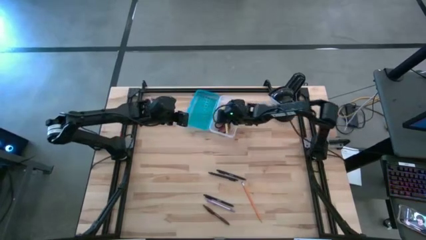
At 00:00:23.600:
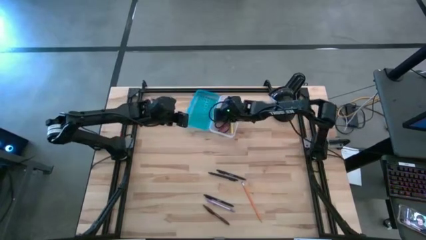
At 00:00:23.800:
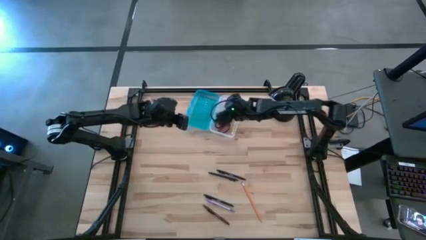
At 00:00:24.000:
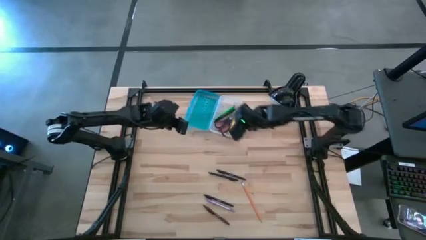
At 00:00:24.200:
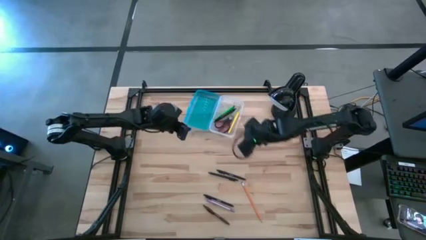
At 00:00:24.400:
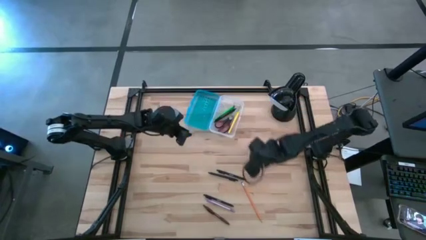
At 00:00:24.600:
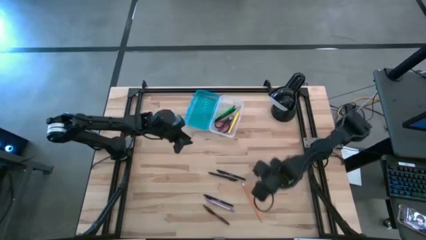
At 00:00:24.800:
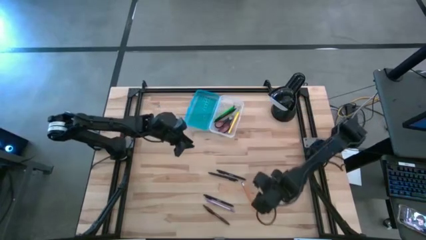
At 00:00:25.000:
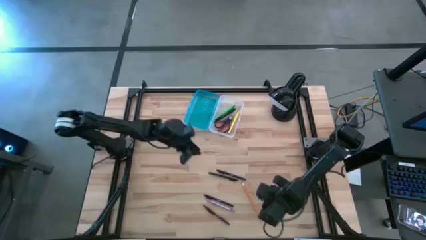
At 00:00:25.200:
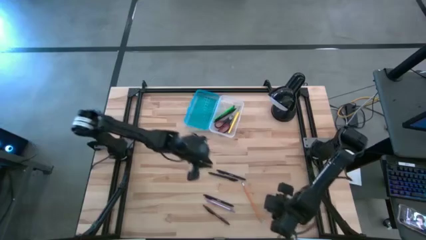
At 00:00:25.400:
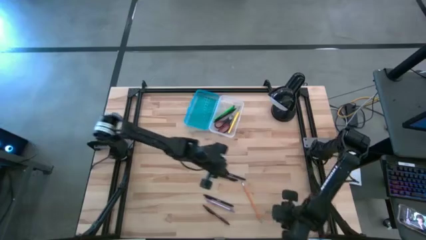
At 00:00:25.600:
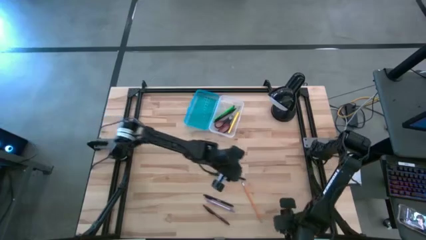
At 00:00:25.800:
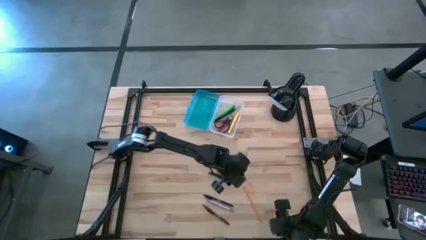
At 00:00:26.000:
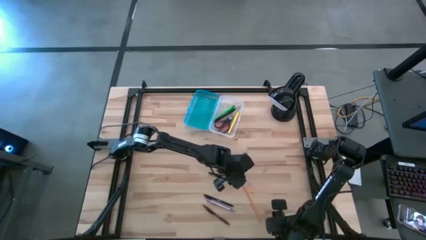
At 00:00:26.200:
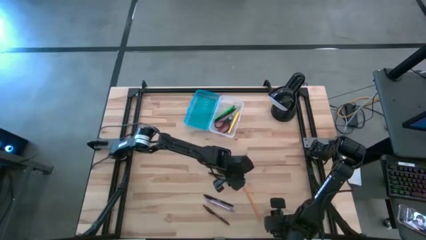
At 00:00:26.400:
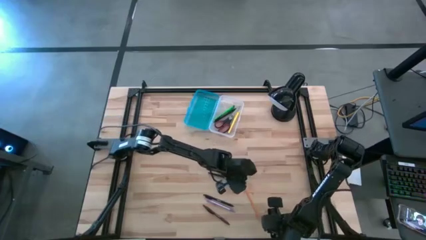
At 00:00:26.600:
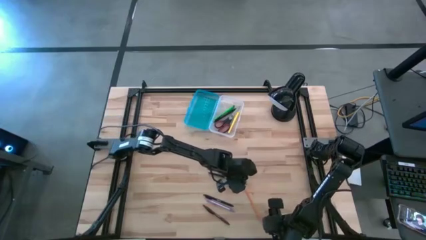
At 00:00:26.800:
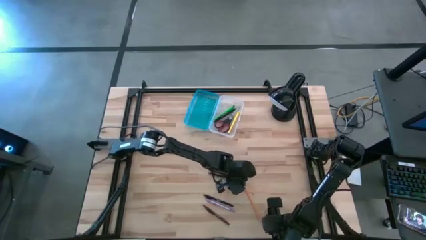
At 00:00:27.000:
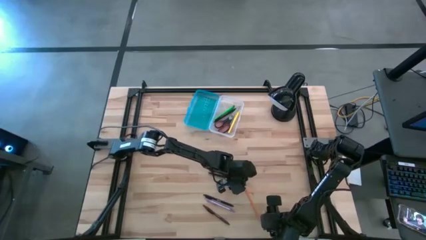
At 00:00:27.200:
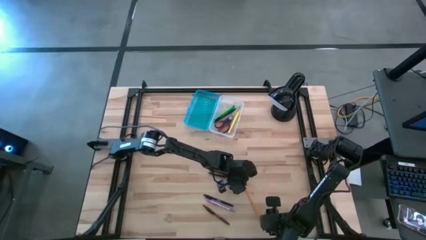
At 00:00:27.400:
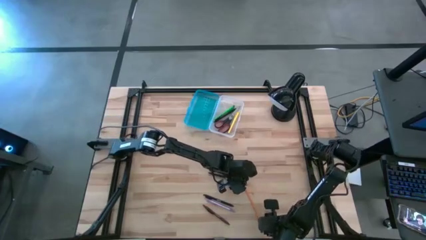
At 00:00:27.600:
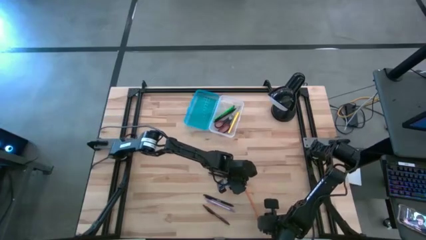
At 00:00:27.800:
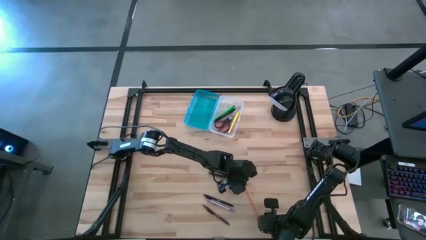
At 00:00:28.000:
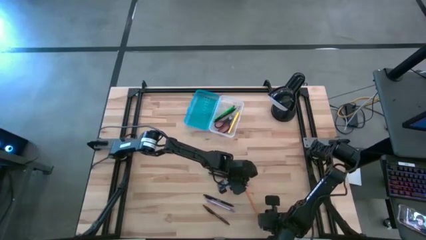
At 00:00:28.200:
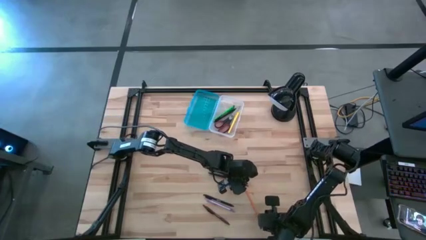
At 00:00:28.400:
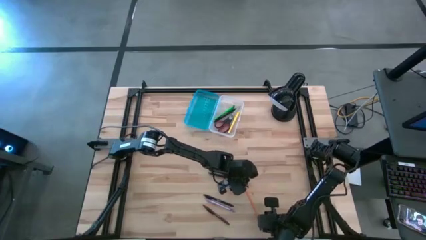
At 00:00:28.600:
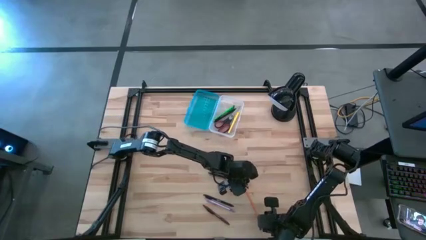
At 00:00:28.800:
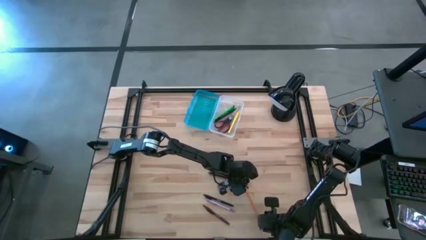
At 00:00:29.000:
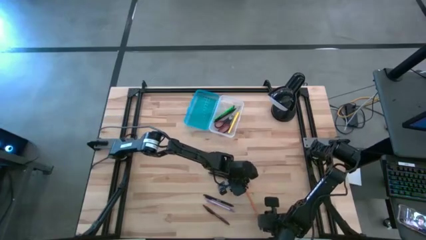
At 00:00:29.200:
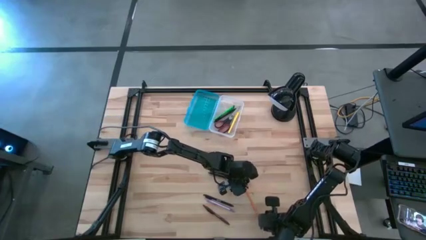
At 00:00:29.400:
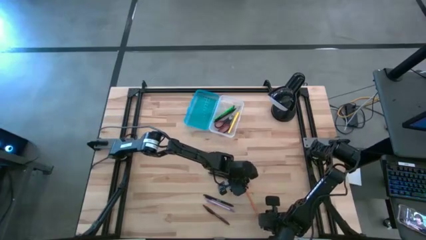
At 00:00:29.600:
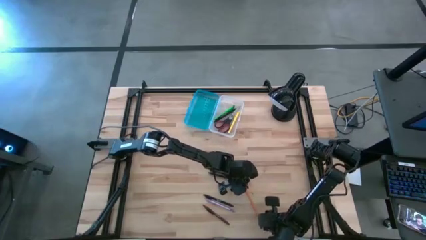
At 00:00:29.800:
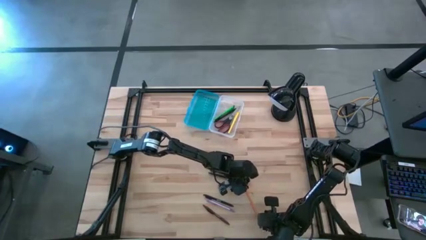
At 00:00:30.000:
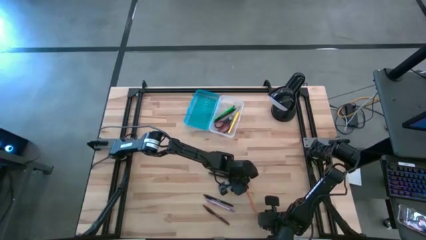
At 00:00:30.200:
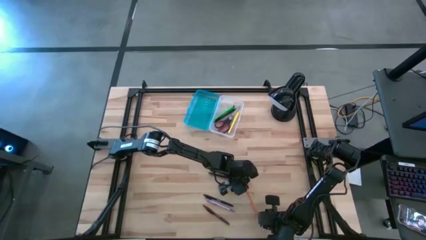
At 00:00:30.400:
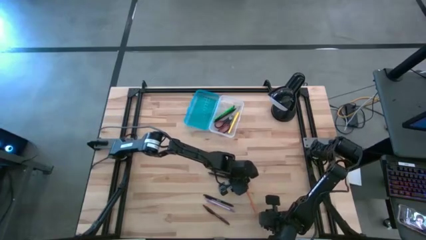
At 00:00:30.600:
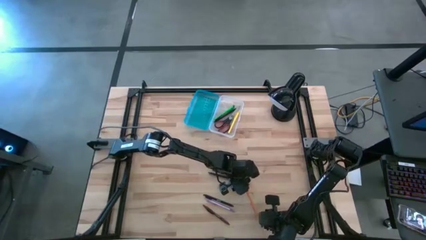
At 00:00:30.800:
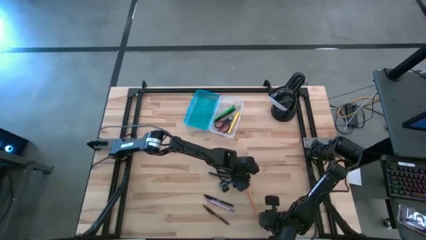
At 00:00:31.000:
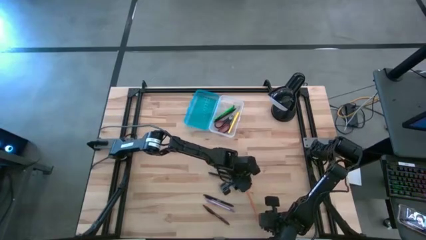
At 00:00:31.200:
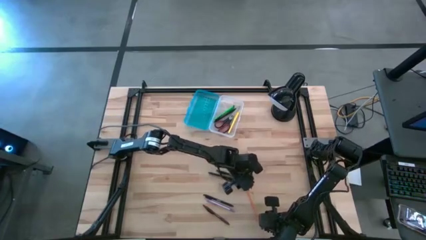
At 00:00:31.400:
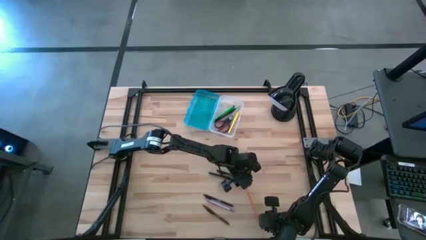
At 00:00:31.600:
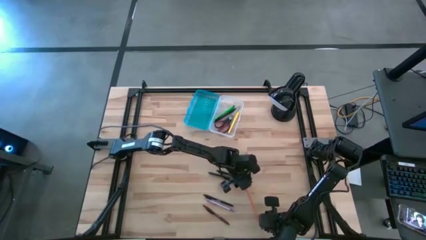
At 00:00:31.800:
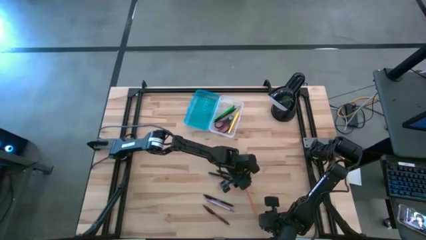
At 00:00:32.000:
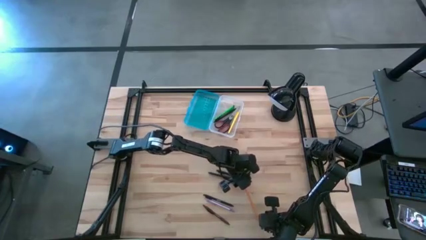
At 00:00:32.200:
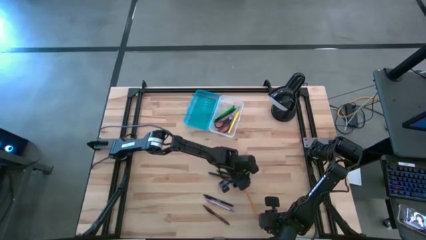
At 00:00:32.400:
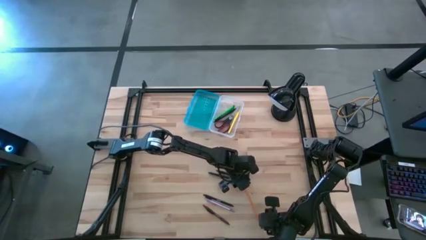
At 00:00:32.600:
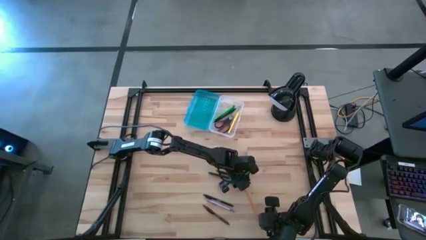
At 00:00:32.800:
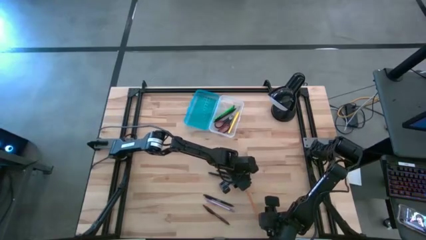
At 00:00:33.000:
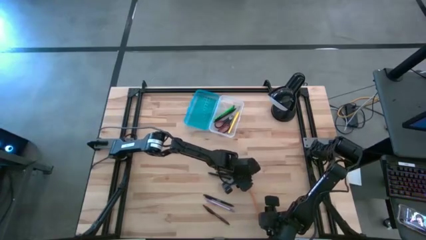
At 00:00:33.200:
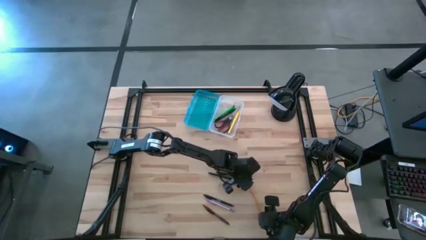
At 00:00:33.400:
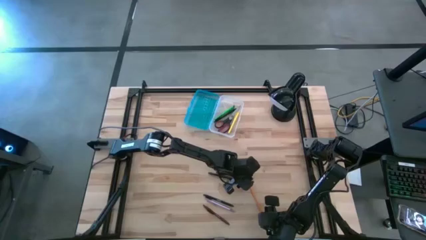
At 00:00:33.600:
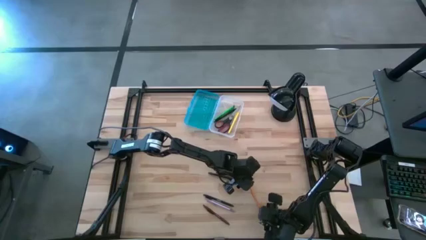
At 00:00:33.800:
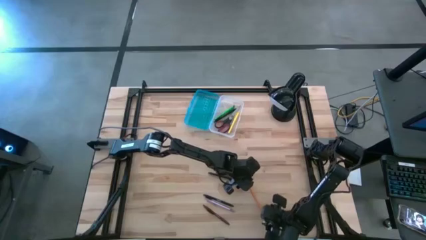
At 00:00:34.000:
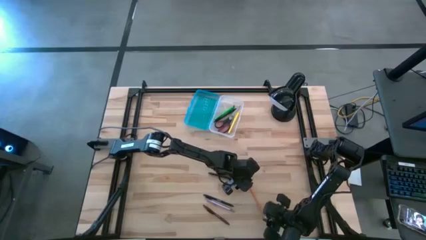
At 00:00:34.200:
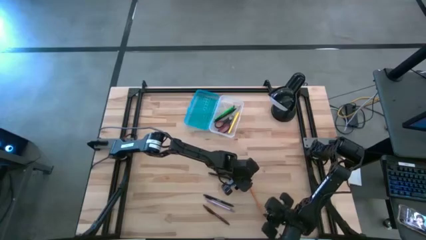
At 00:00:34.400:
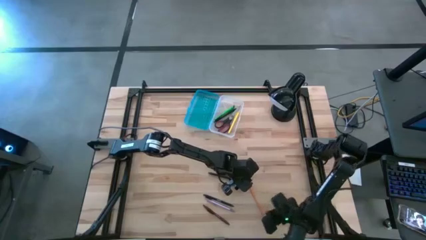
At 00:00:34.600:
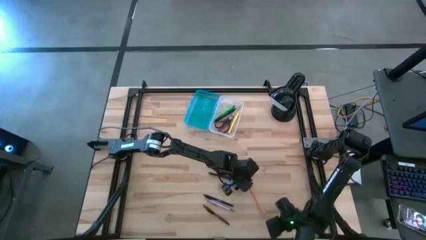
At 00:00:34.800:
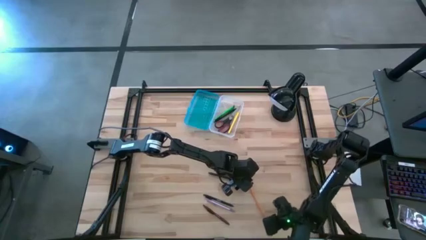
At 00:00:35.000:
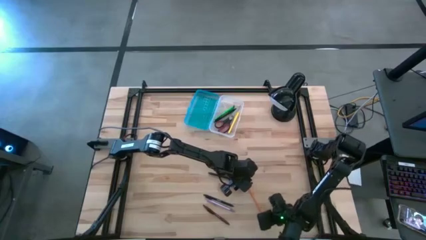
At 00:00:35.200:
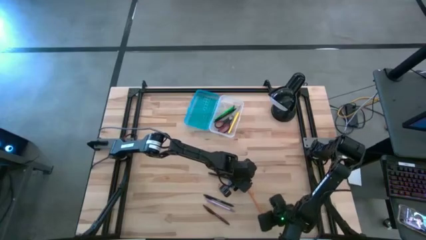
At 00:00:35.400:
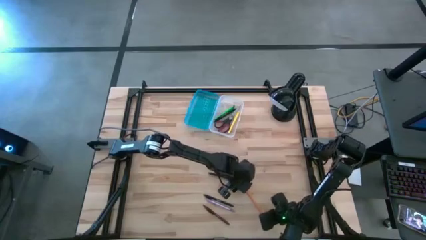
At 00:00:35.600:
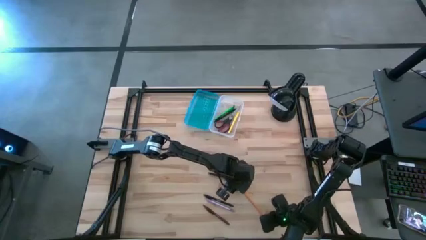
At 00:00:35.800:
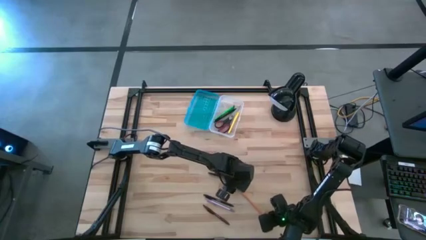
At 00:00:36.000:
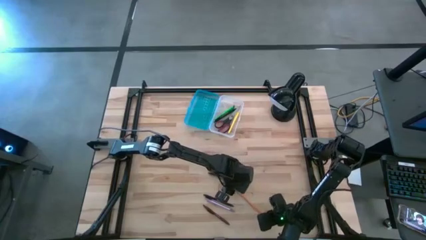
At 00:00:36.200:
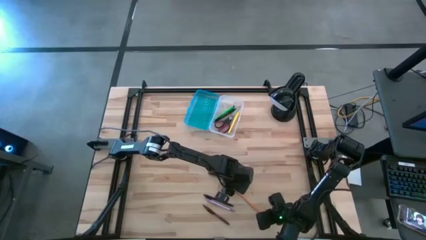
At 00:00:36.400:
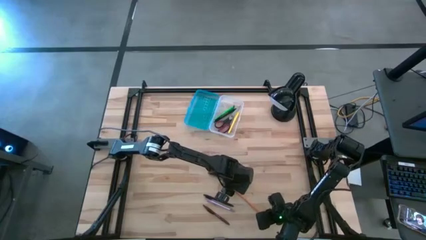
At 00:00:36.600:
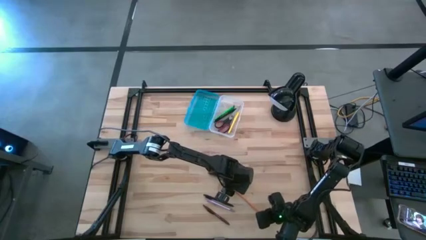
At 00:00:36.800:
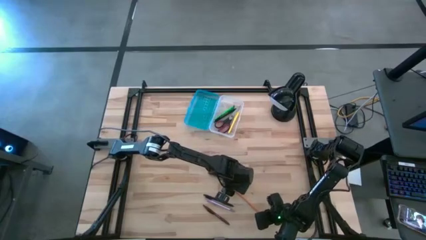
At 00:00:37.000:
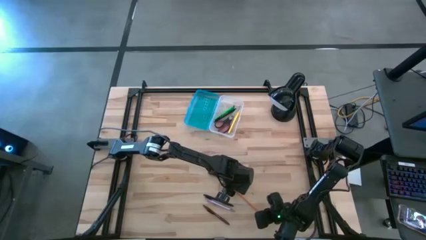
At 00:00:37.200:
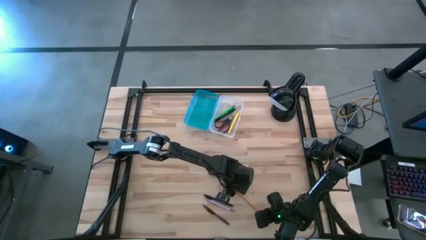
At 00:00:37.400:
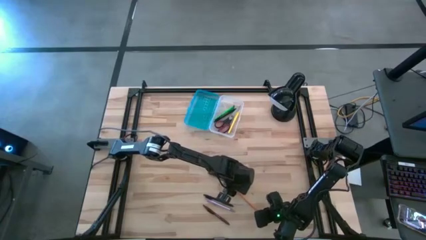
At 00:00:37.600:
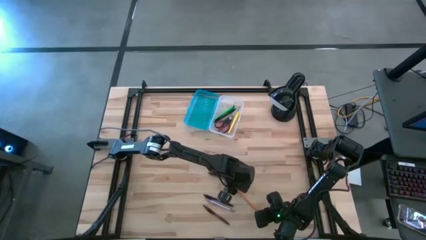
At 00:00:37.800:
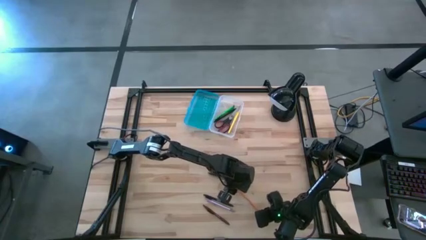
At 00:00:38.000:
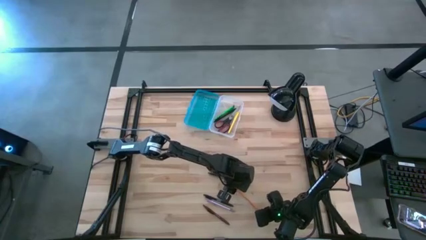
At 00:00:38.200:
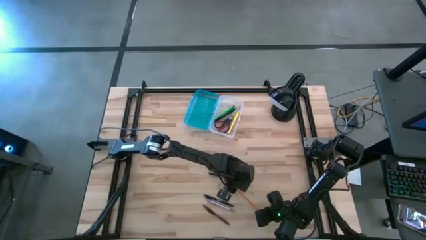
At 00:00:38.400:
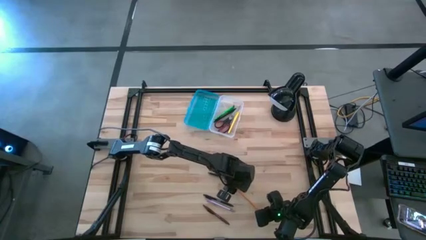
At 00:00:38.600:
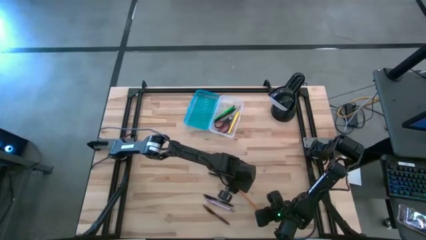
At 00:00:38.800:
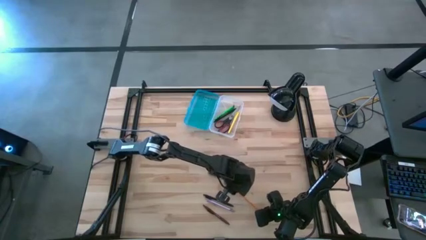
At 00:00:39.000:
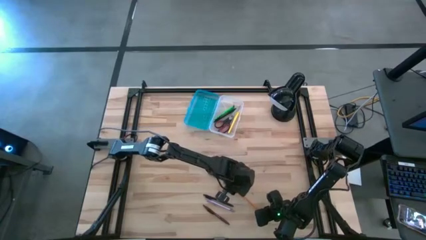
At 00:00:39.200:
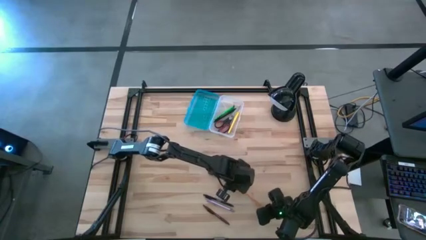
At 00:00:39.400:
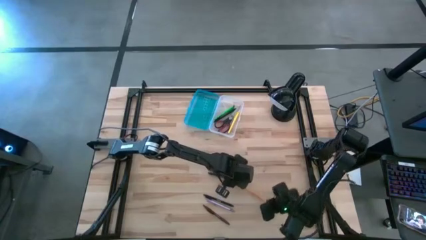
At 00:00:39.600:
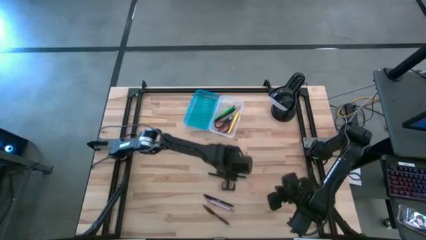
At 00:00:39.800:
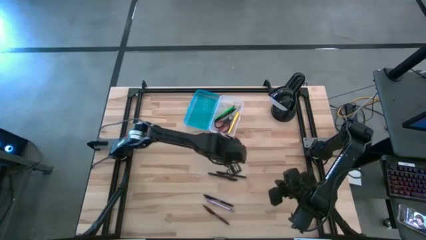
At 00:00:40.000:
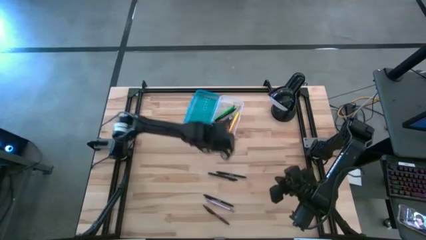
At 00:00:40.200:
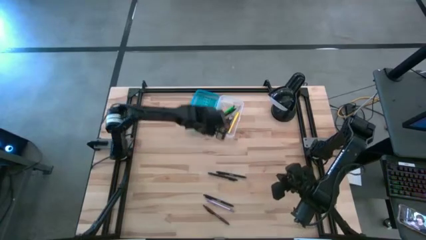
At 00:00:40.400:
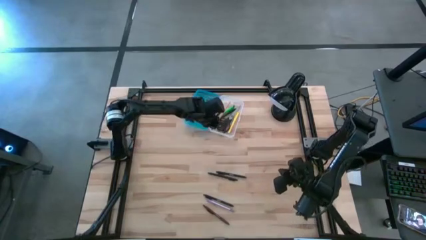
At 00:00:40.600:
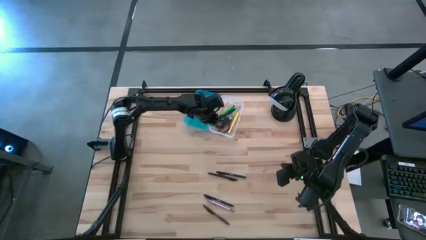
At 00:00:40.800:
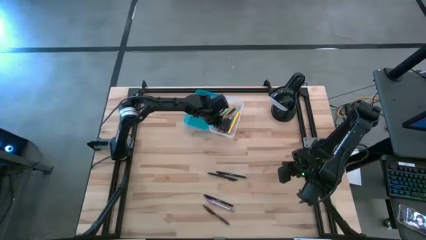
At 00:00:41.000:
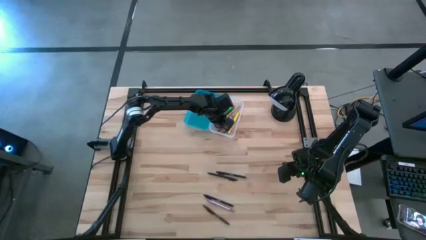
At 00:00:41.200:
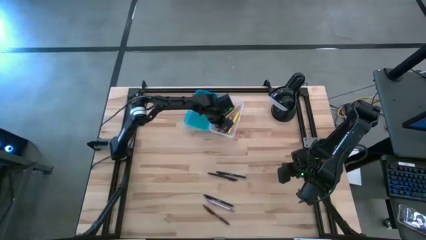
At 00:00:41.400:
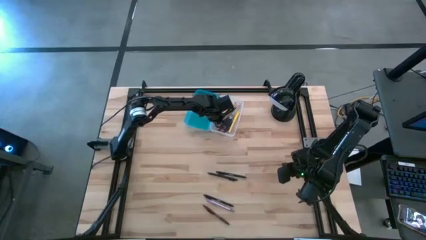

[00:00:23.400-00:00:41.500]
Task: Pick & place school supplies into a supply box
Put the yellow pencil into the blue supply box
